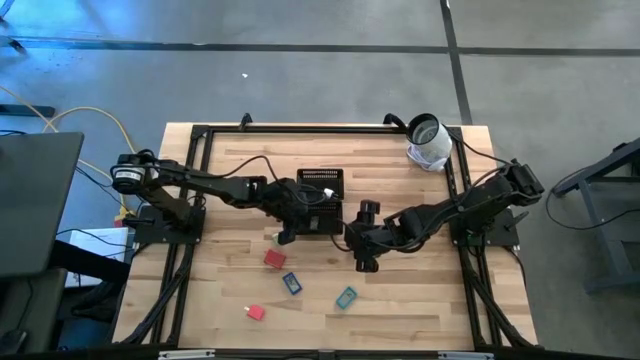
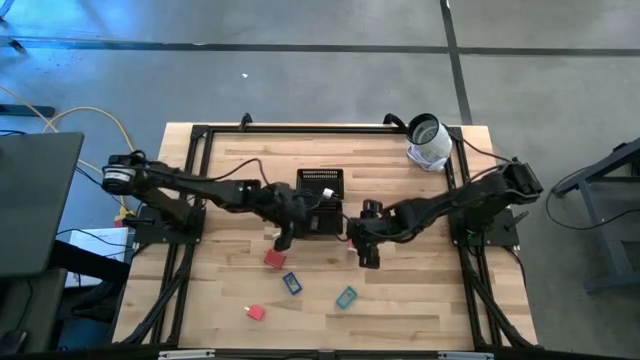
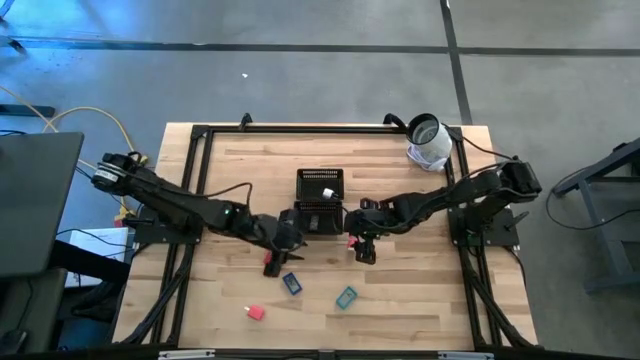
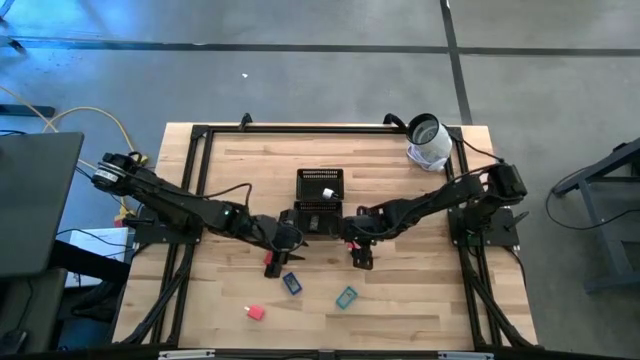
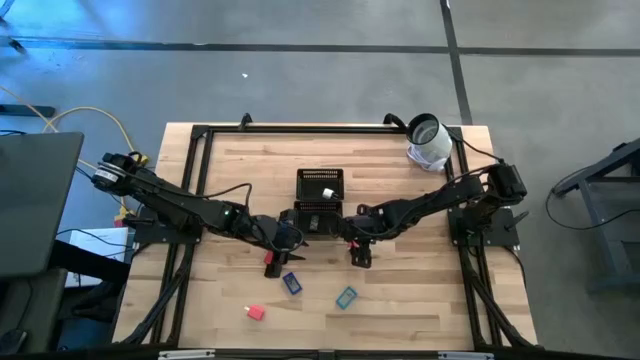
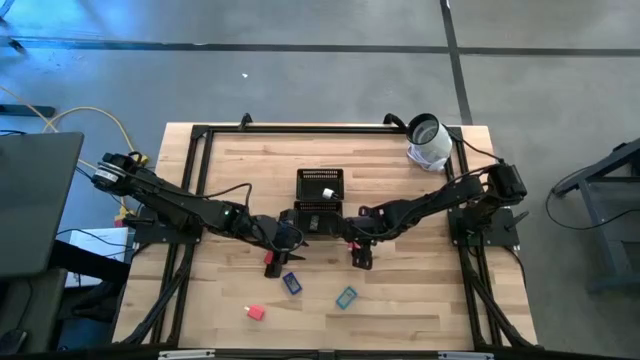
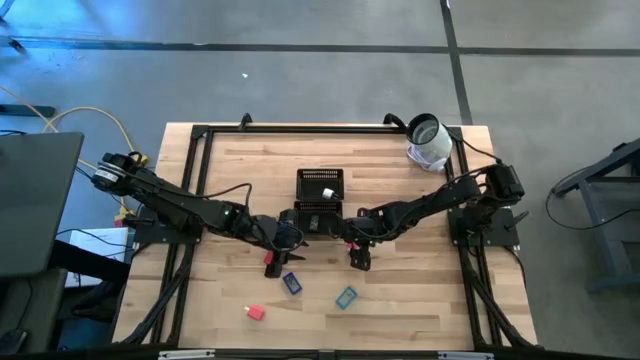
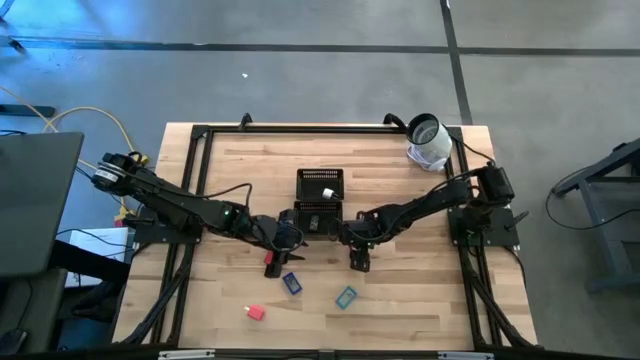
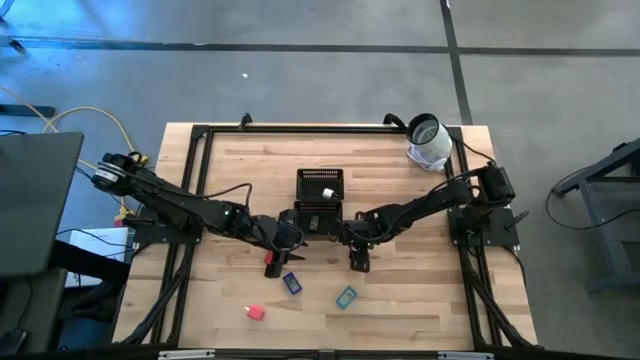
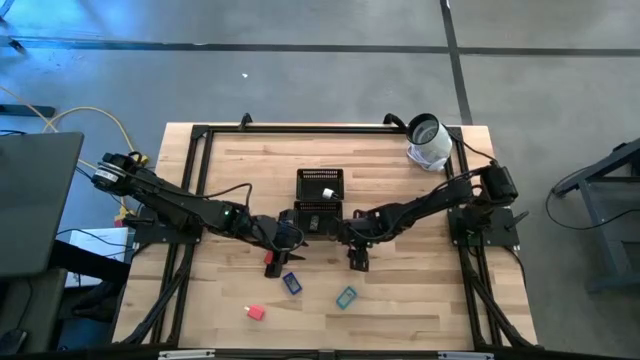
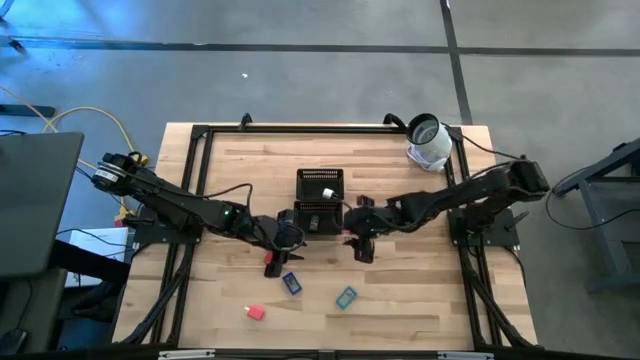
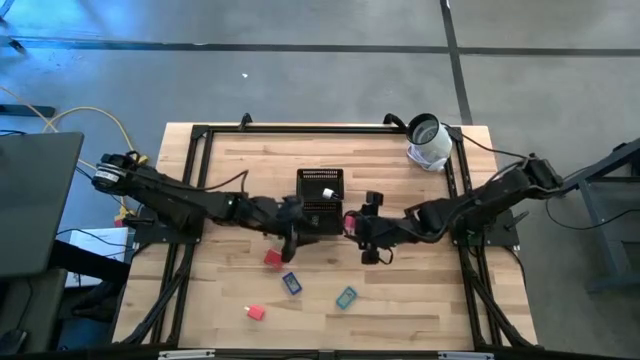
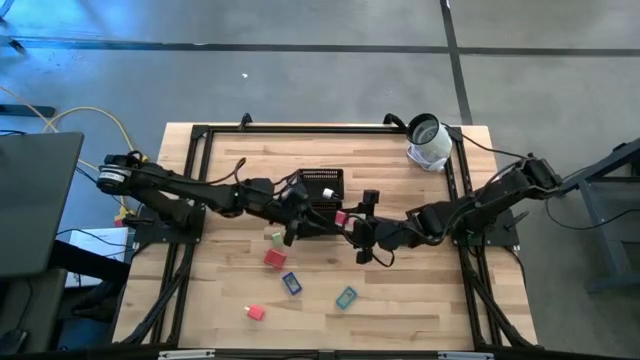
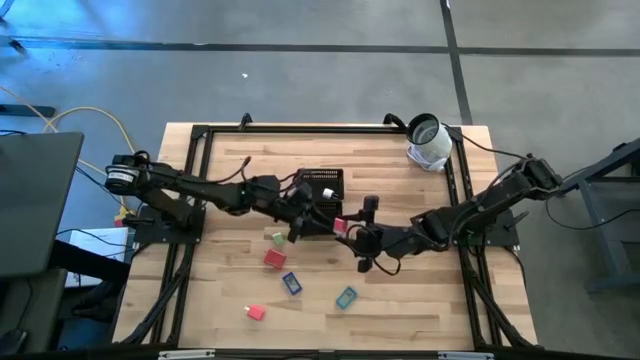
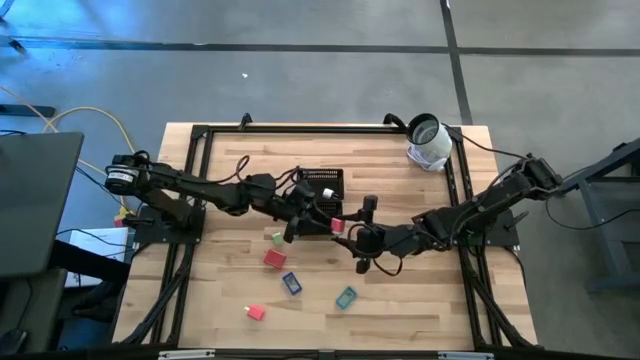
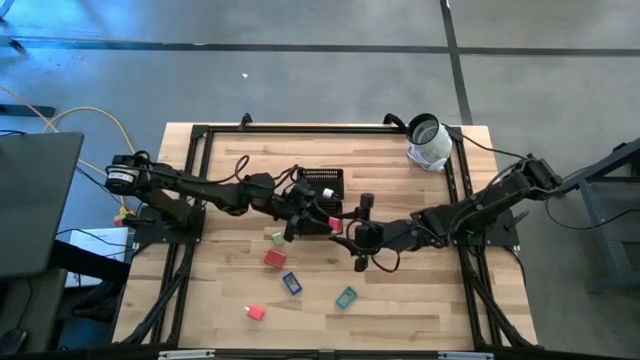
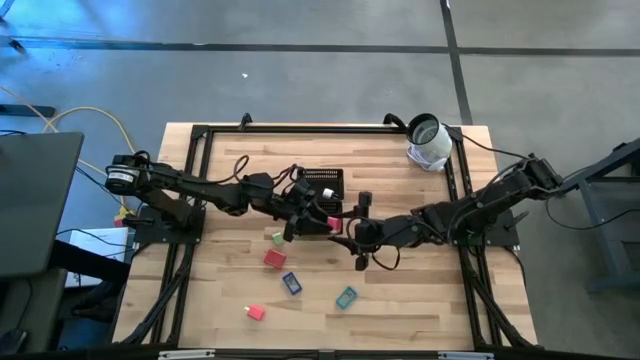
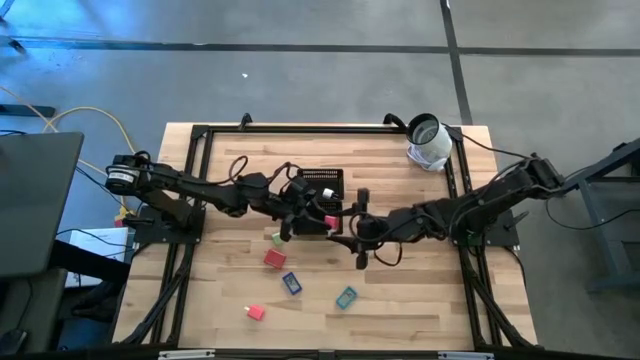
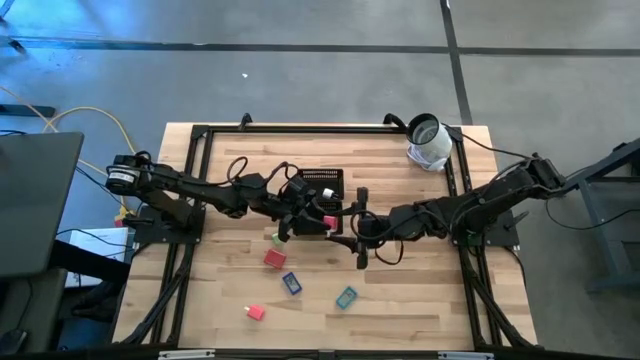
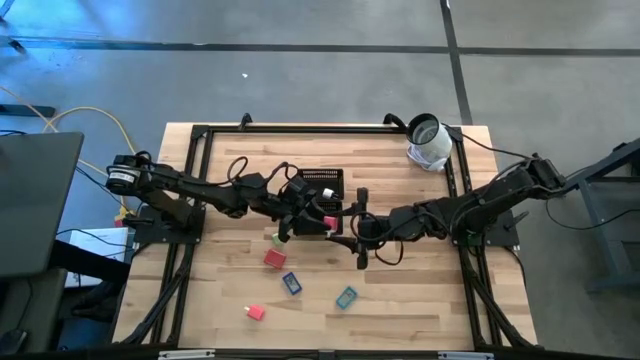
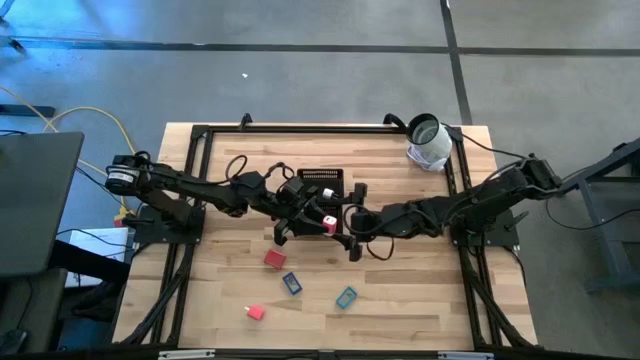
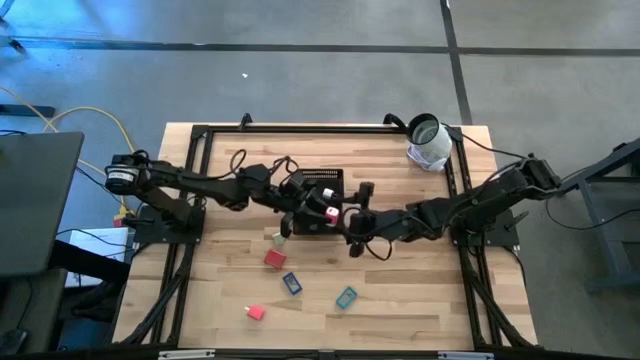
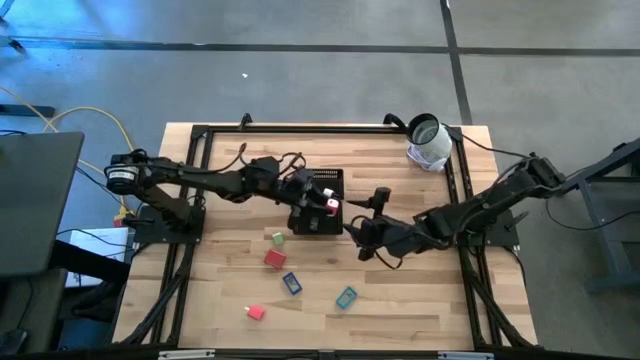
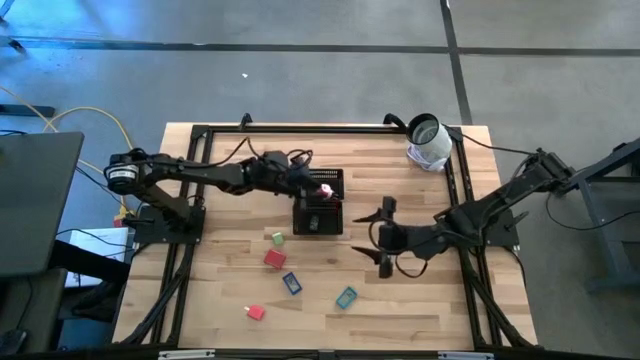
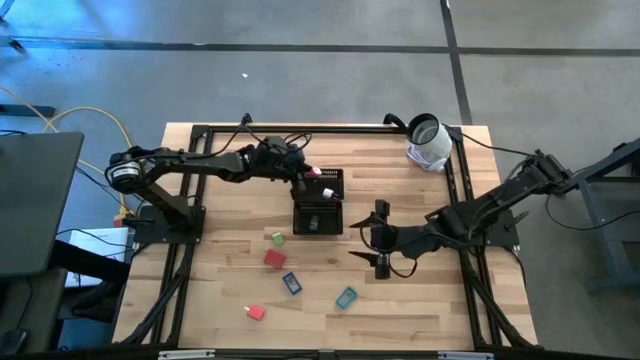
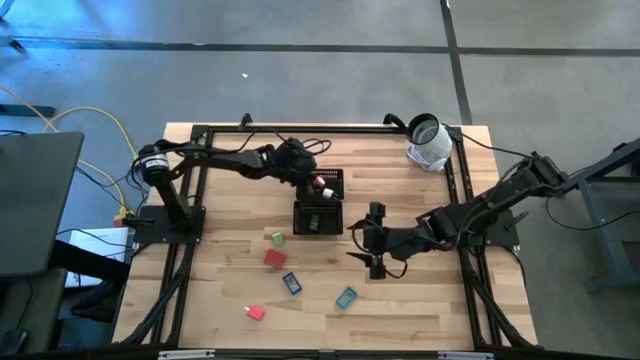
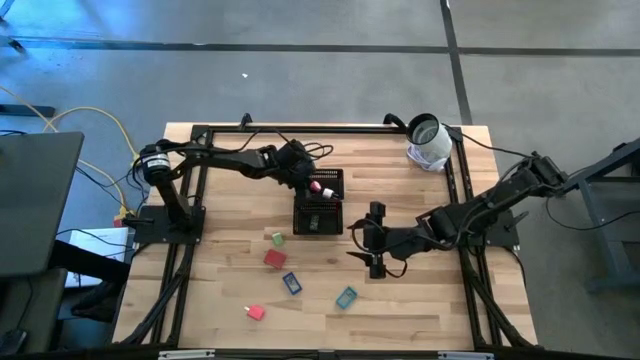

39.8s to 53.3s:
Task: Pick & Place Office items
Put the pink and white charger adapter into the top black bin

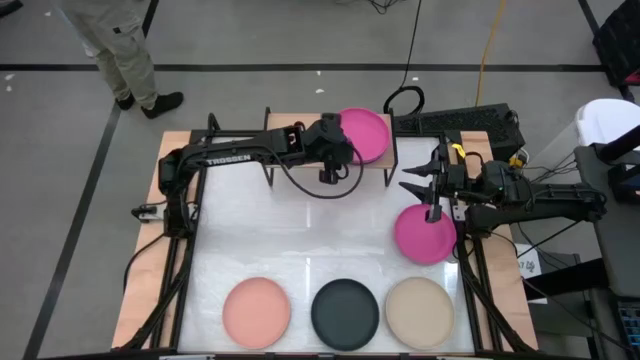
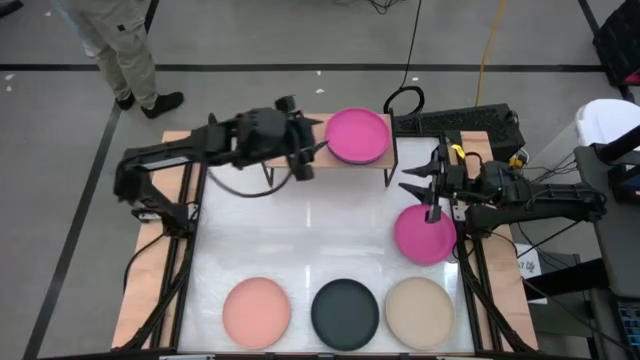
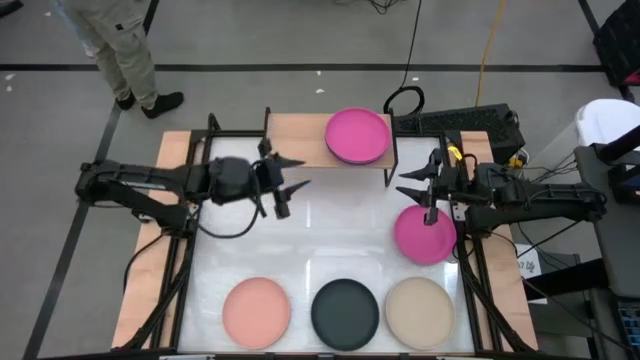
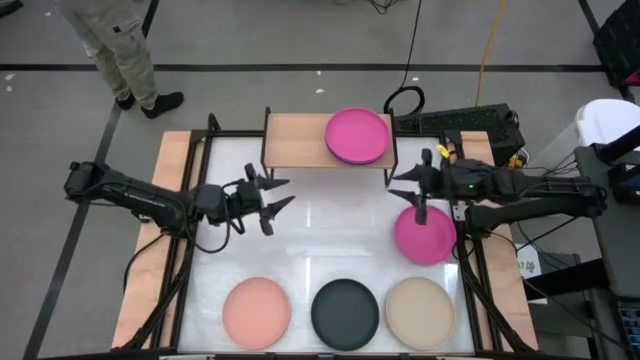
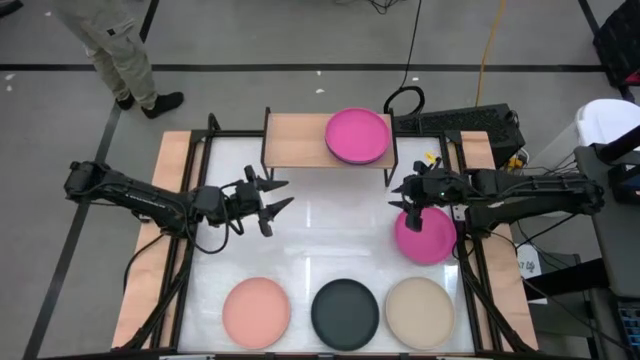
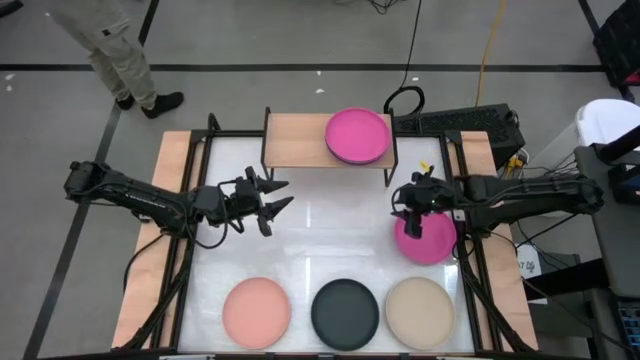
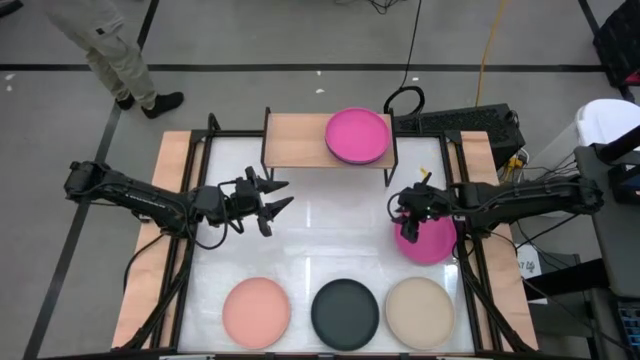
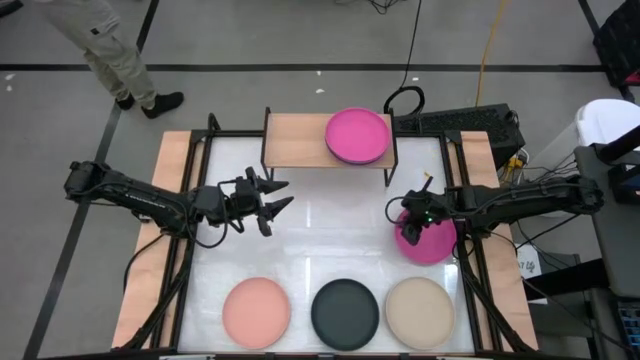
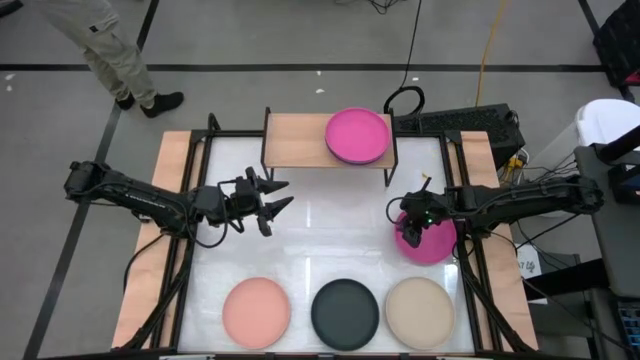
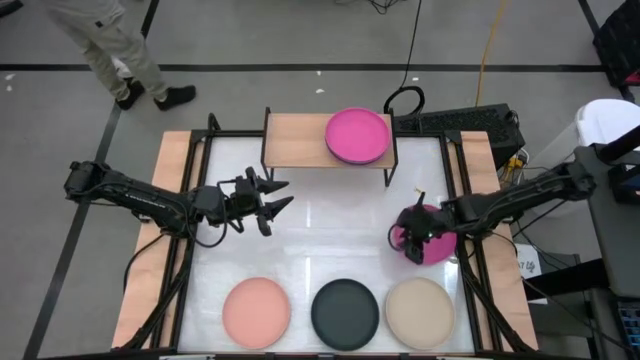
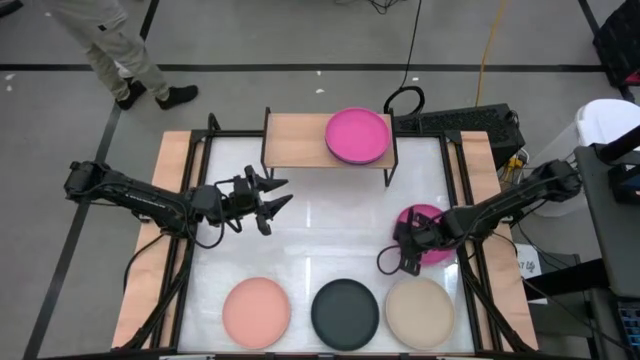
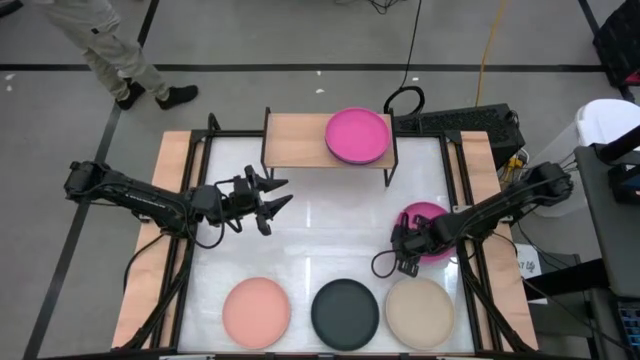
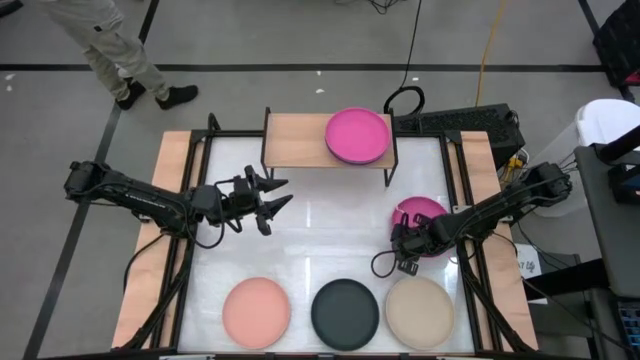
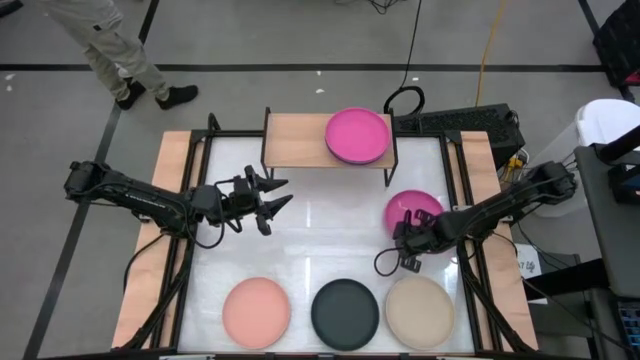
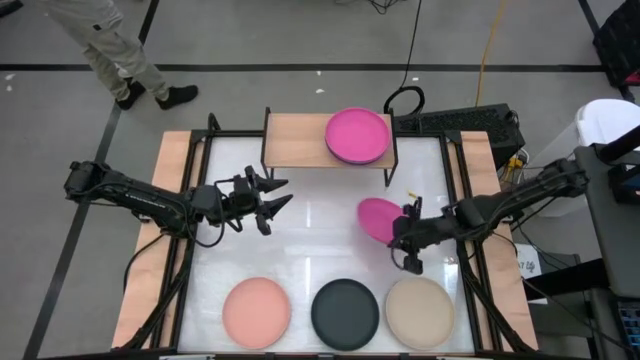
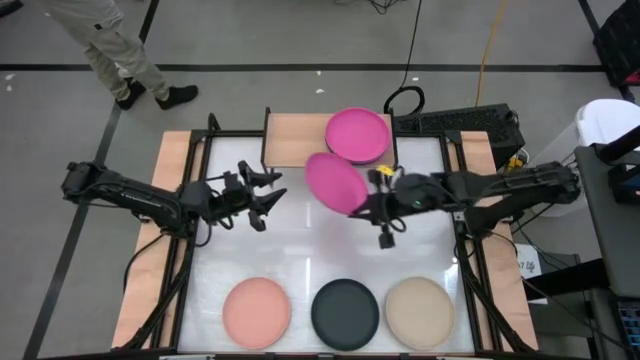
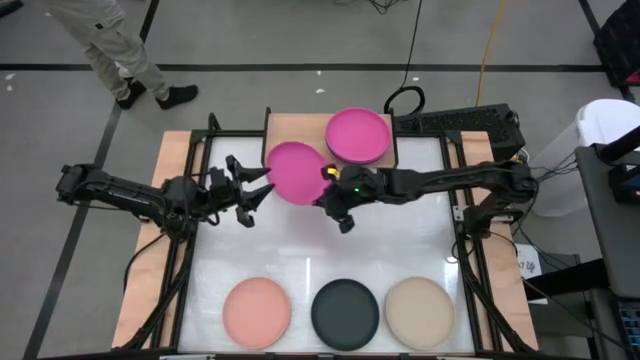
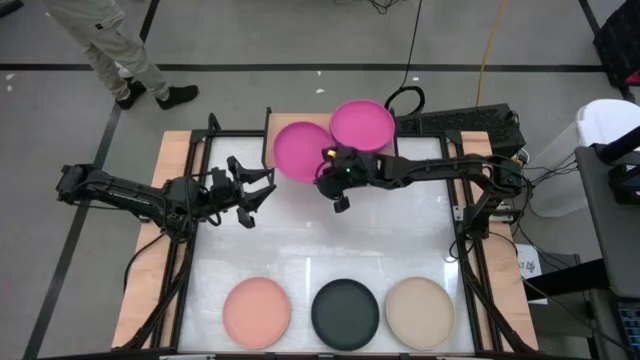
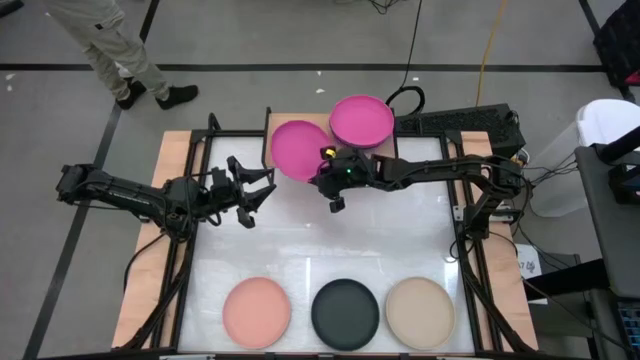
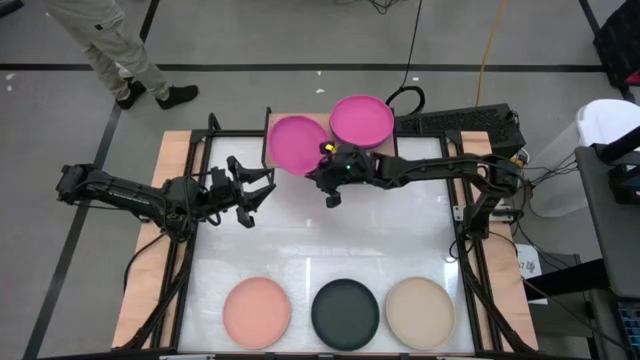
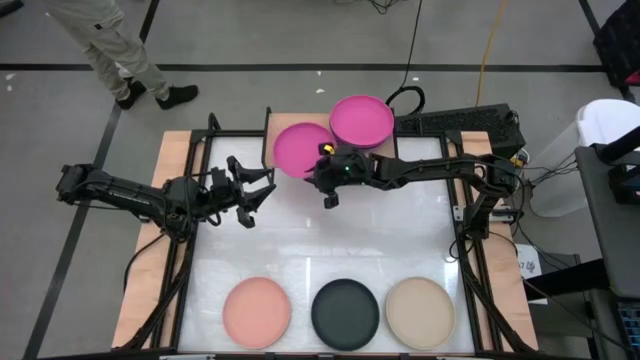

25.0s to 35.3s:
Task: Place and stack plates onto a shelf
Put the pink plate on the shelf
